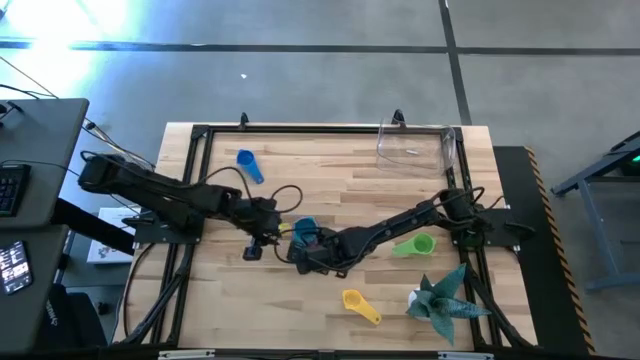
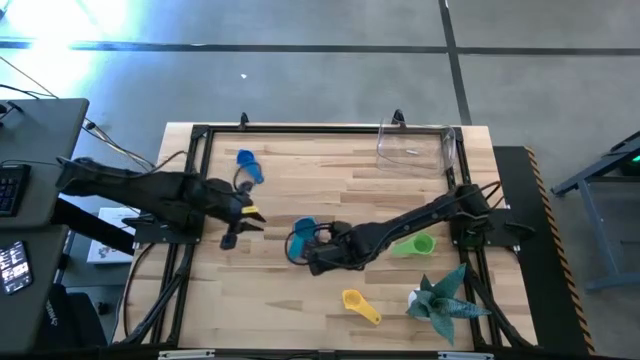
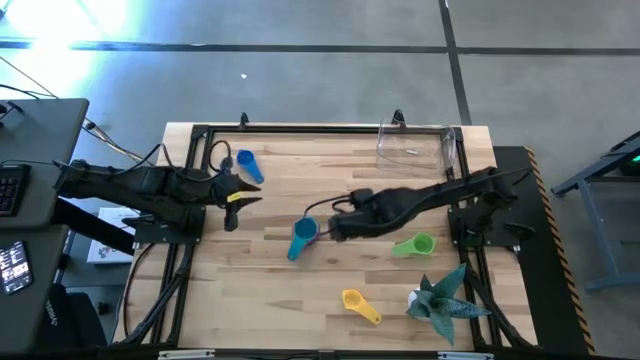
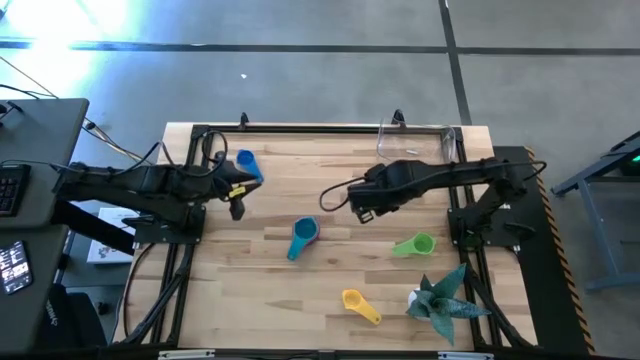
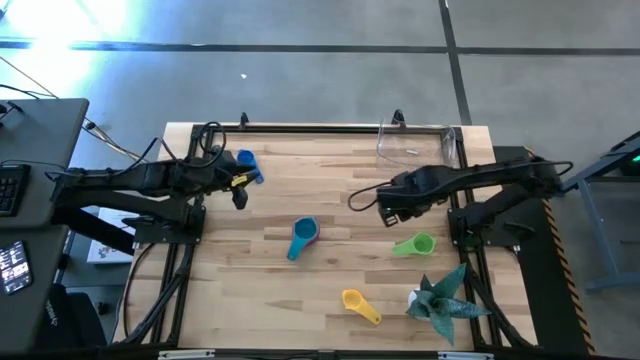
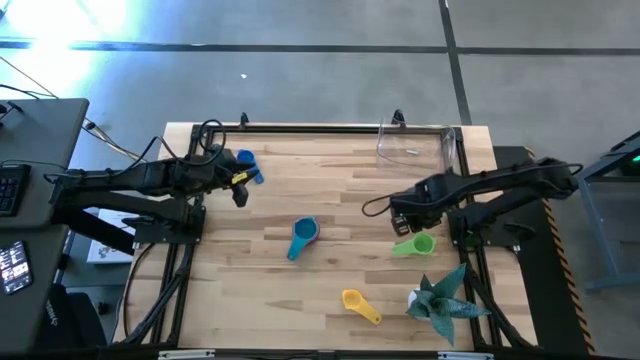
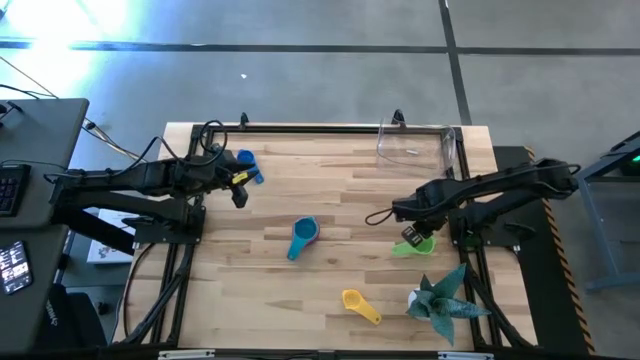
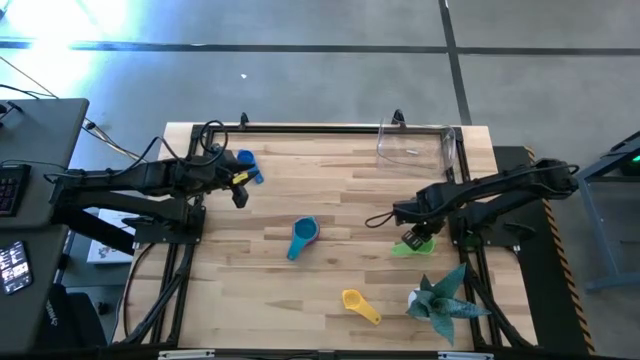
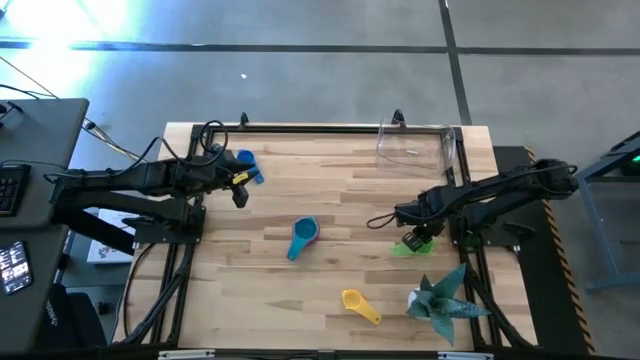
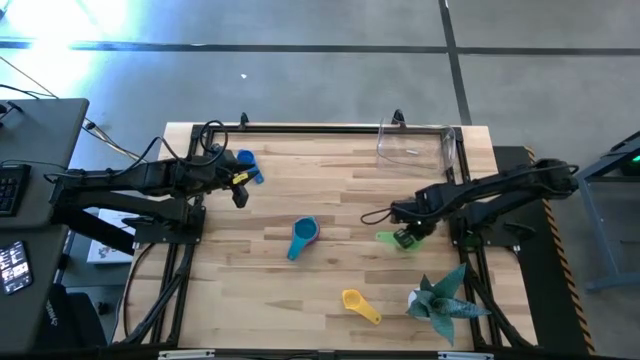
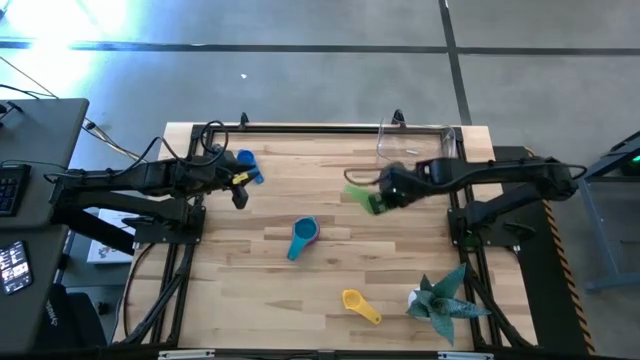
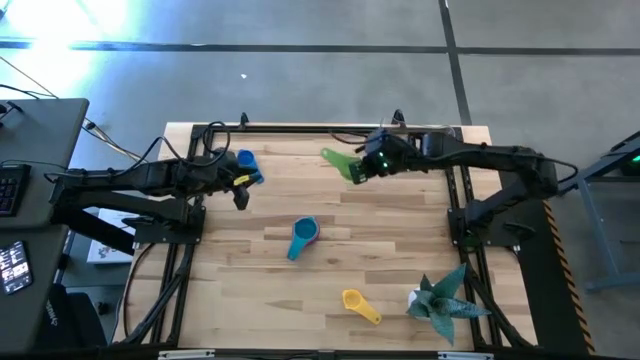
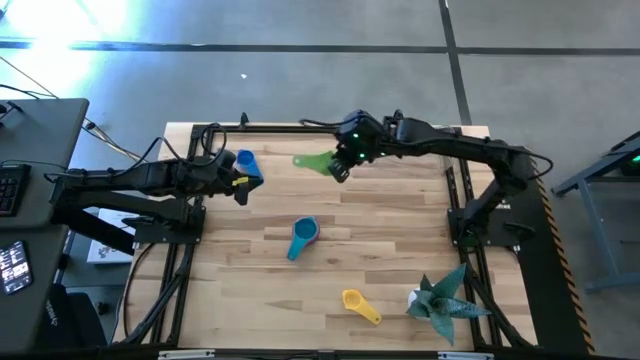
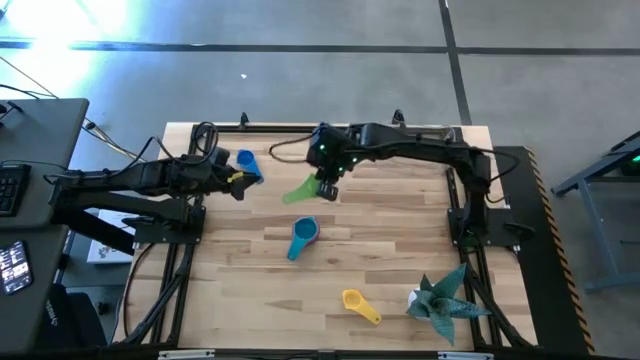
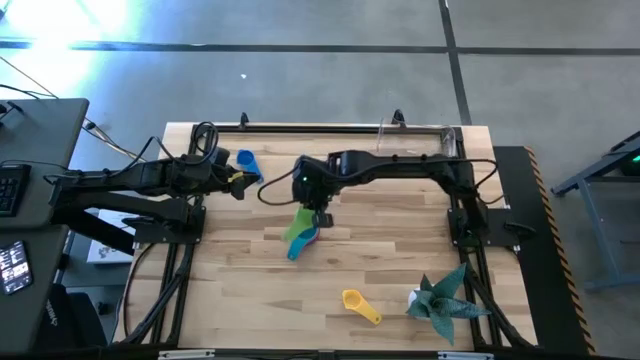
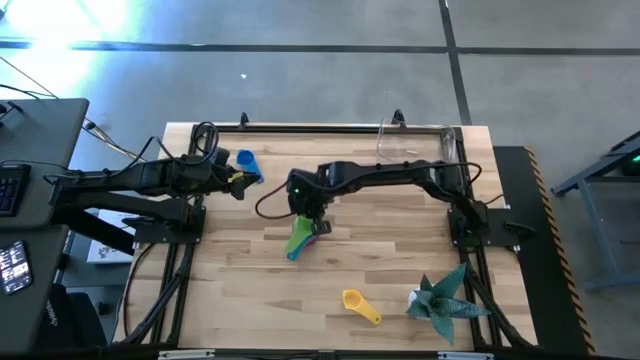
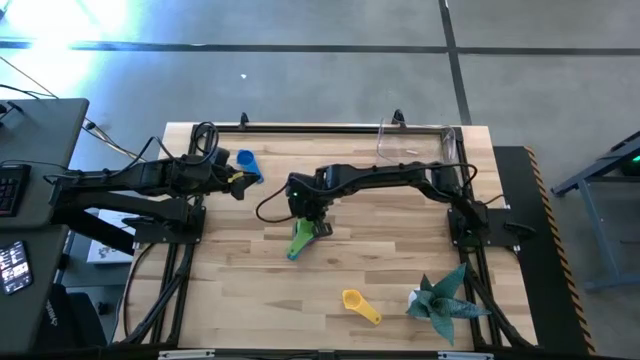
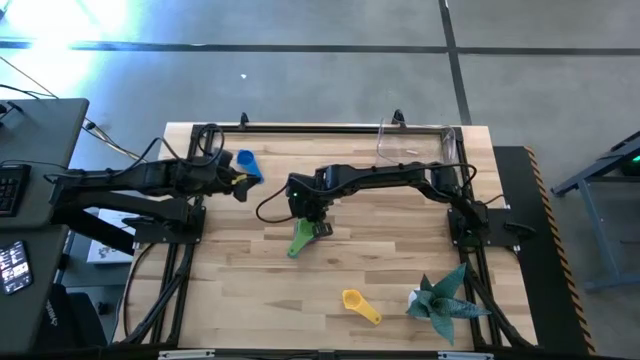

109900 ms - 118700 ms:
Task: Nest measuring cups in basket
Stack the green measuring cup on top of the light blue measuring cup

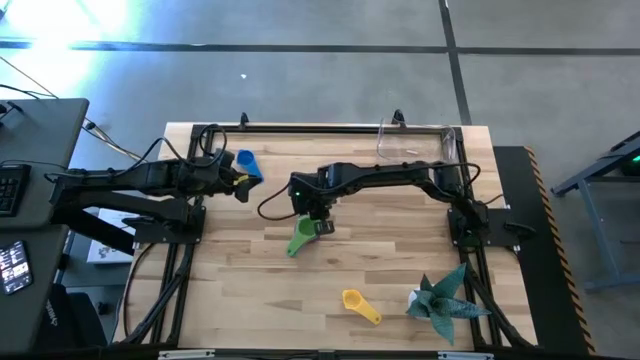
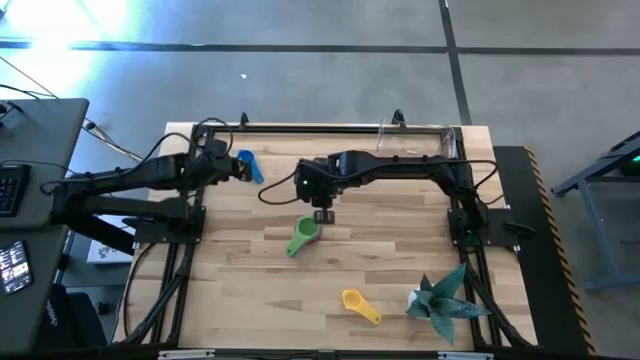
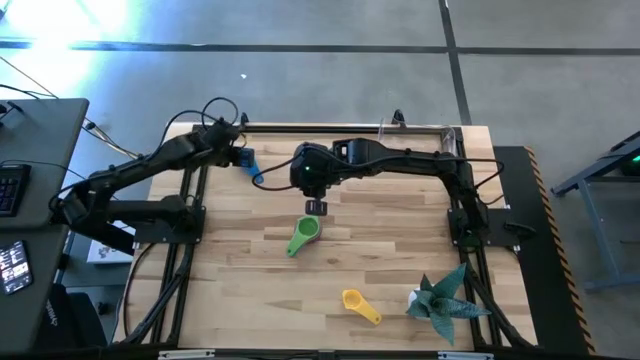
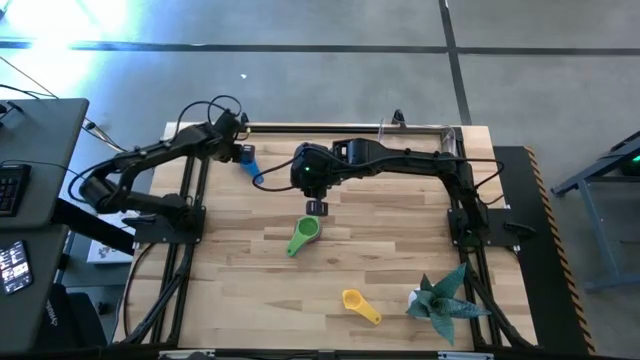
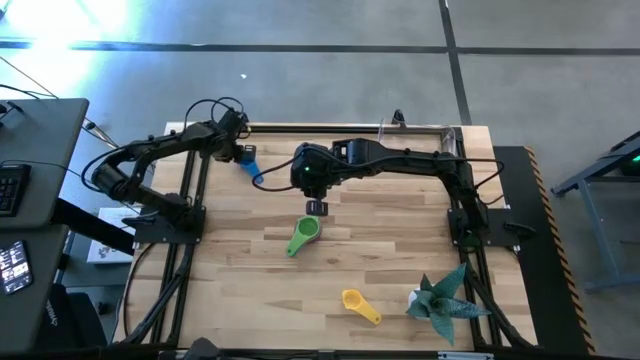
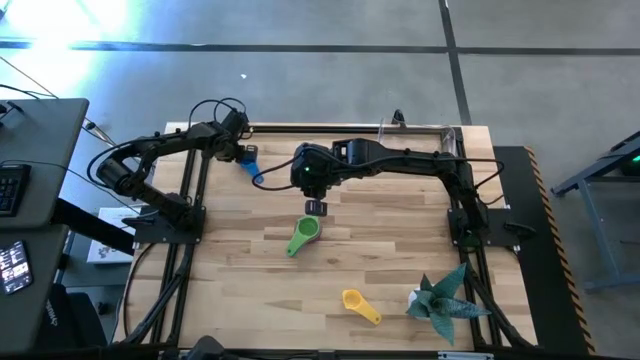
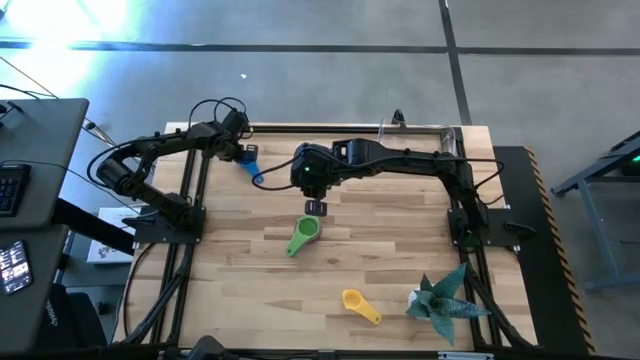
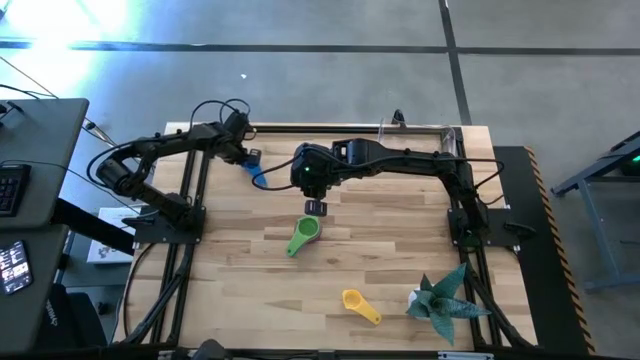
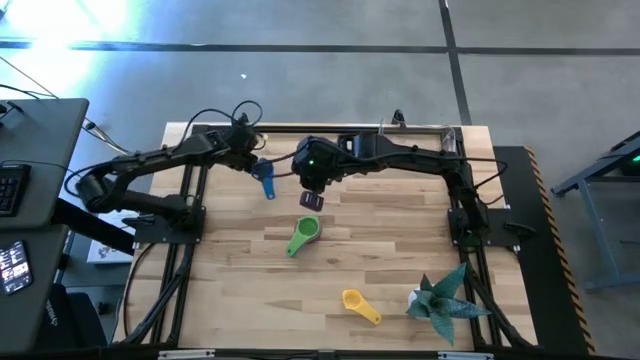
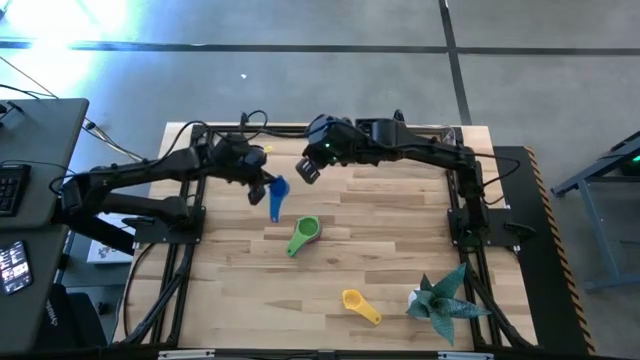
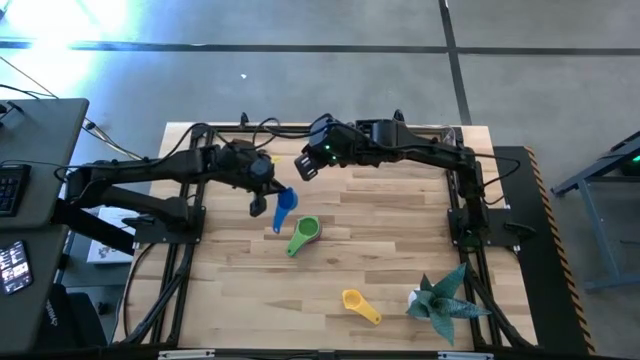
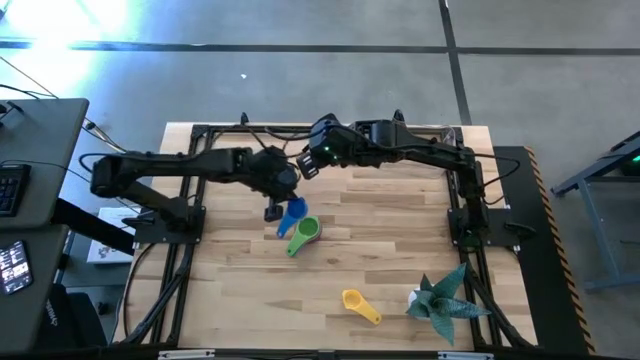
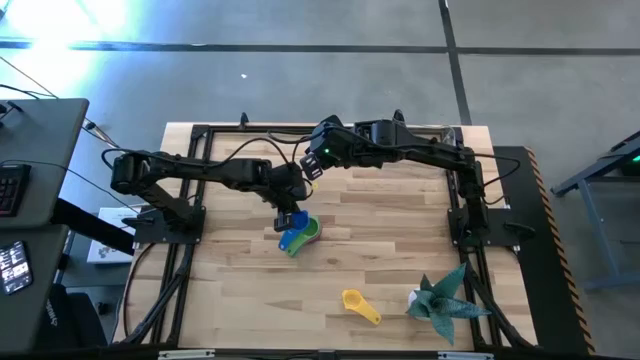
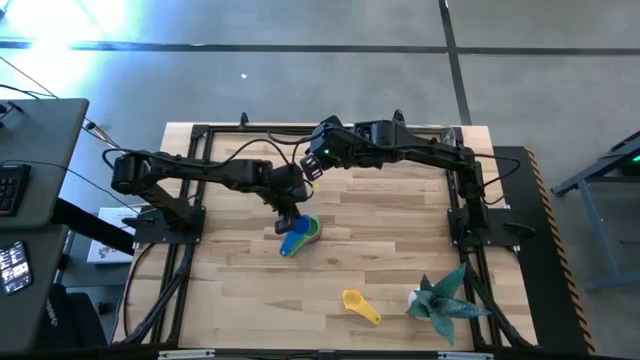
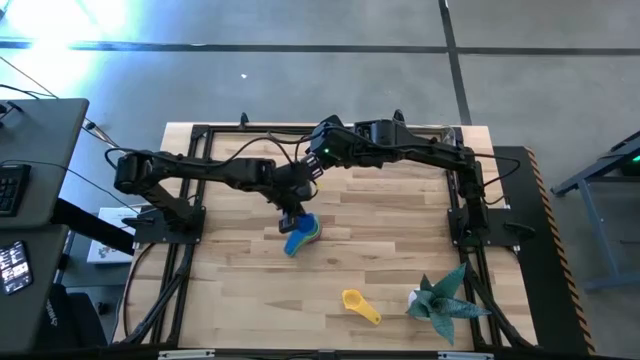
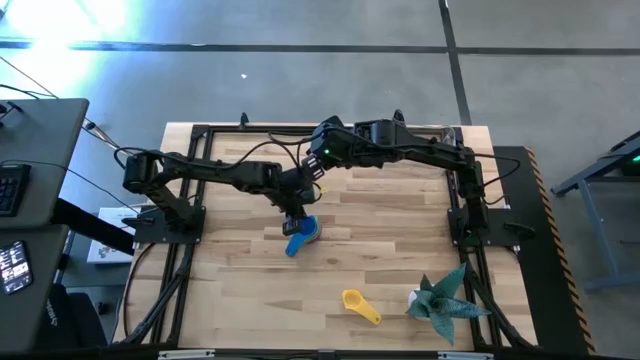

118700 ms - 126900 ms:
Stack the blue measuring cup on top of the green measuring cup

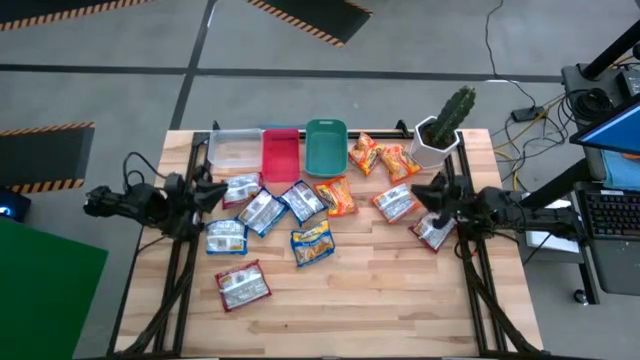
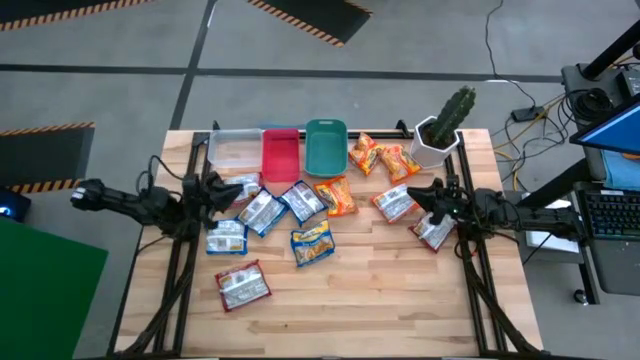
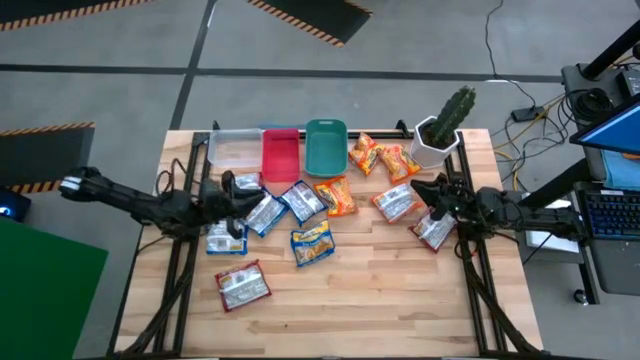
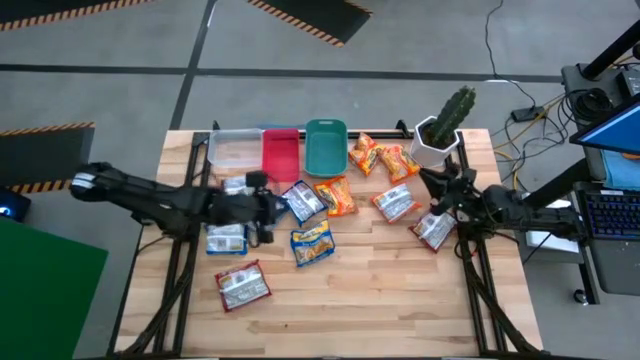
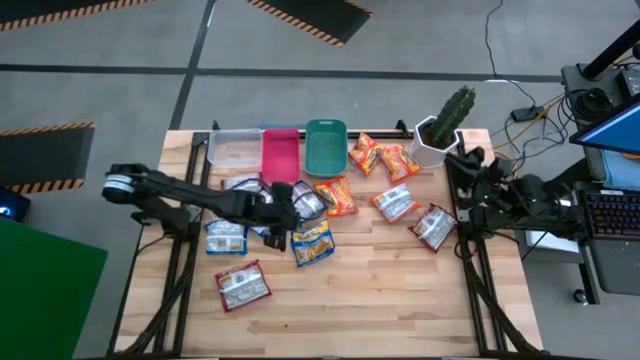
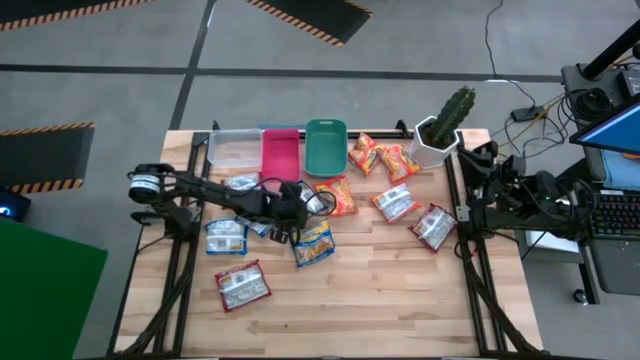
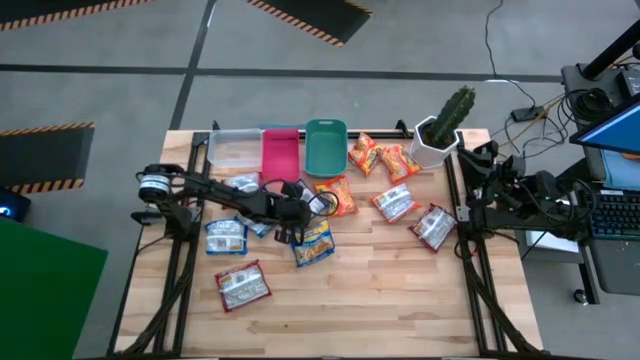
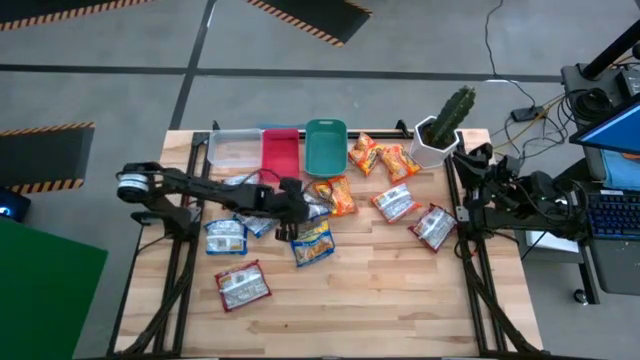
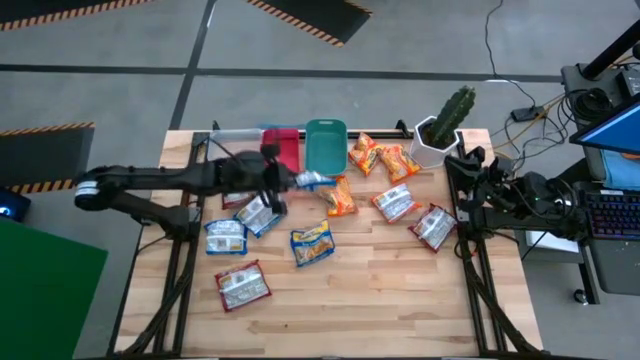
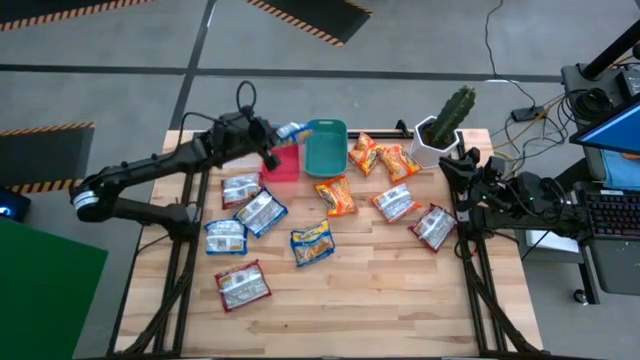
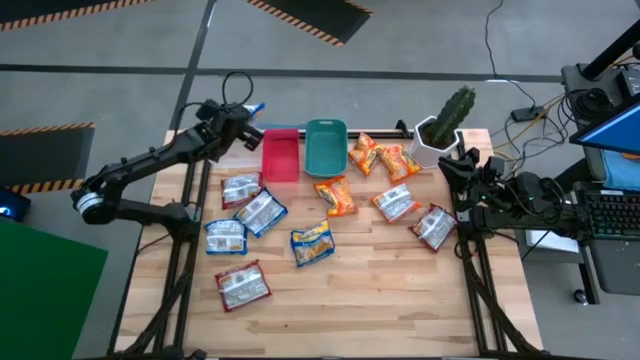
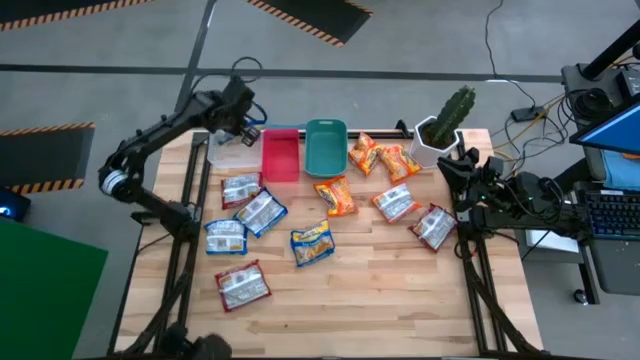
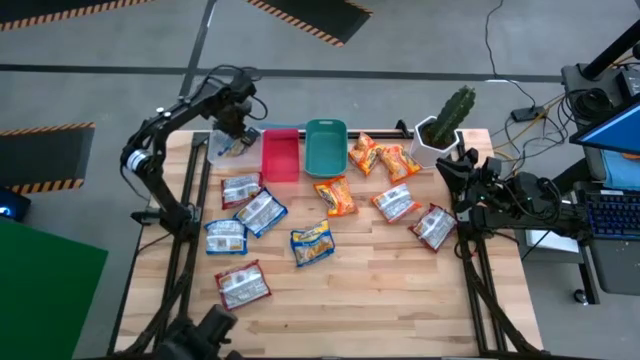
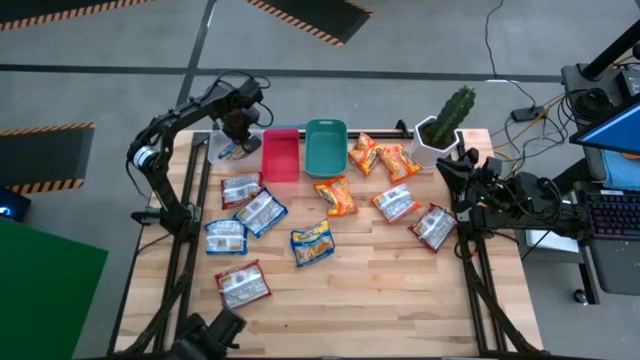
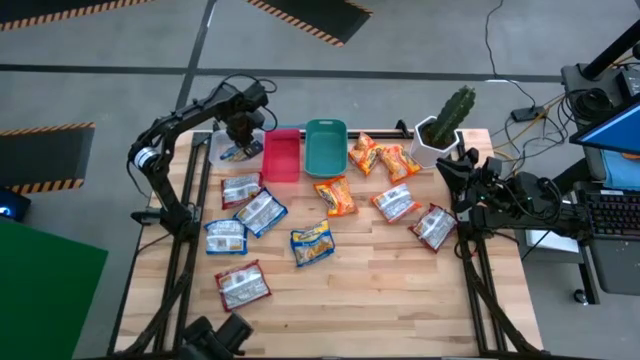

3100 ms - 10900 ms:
Task: Sort Maruchan noodles
Put the blue noodle pack into the transparent bin
